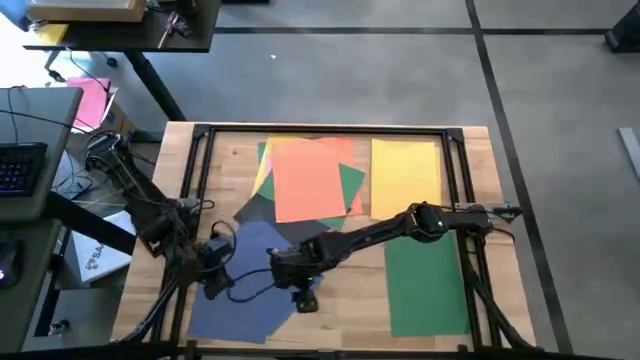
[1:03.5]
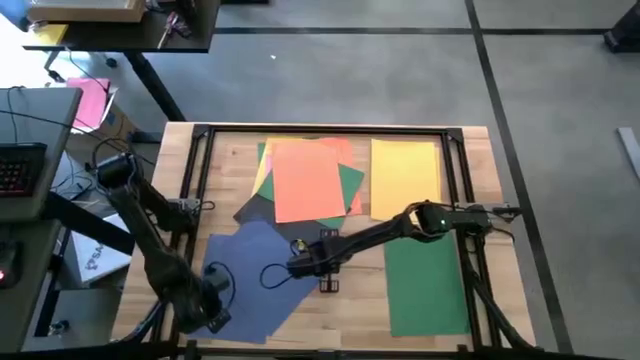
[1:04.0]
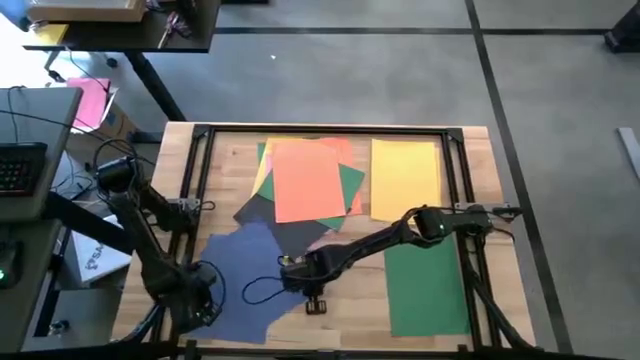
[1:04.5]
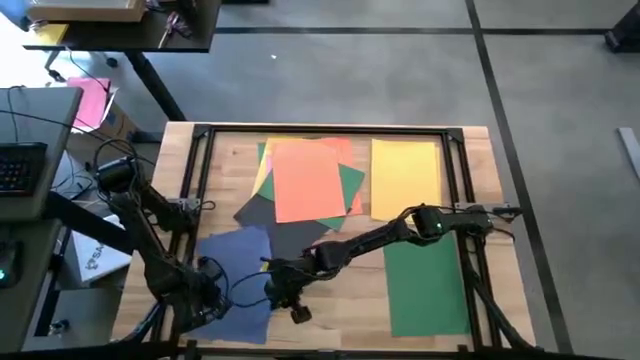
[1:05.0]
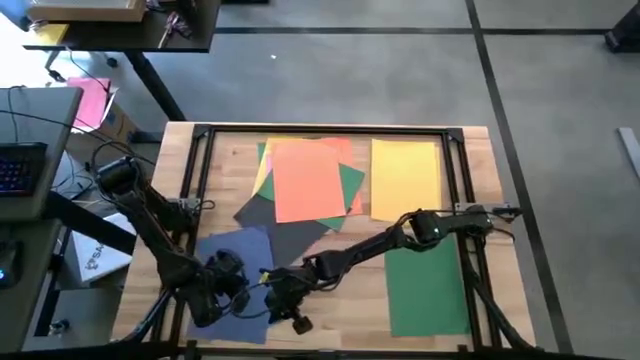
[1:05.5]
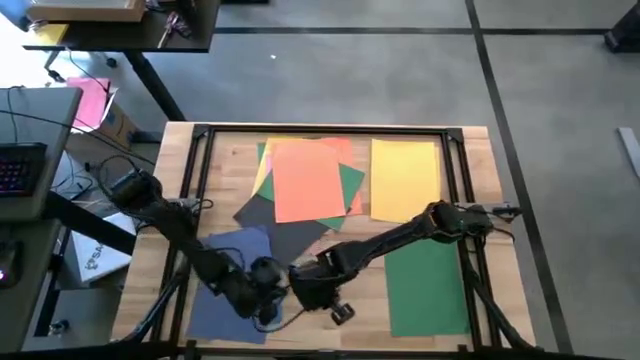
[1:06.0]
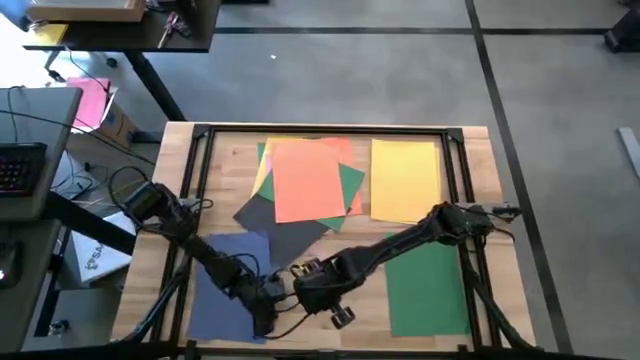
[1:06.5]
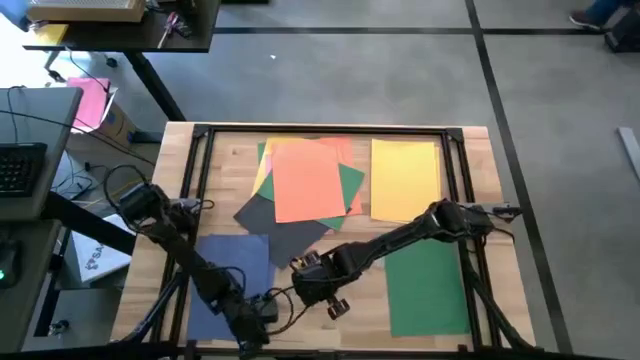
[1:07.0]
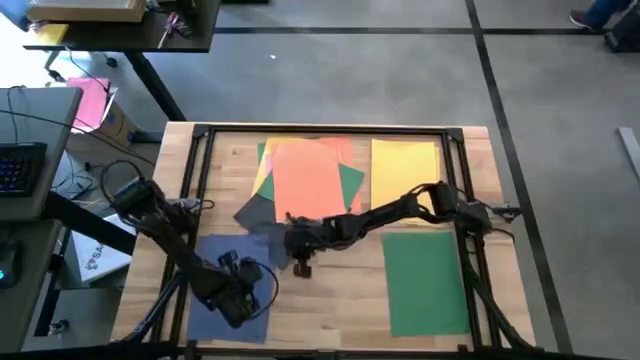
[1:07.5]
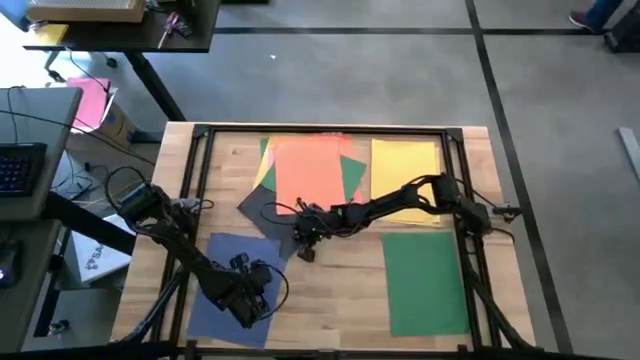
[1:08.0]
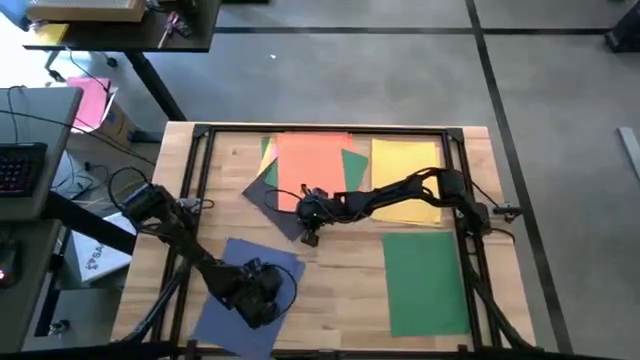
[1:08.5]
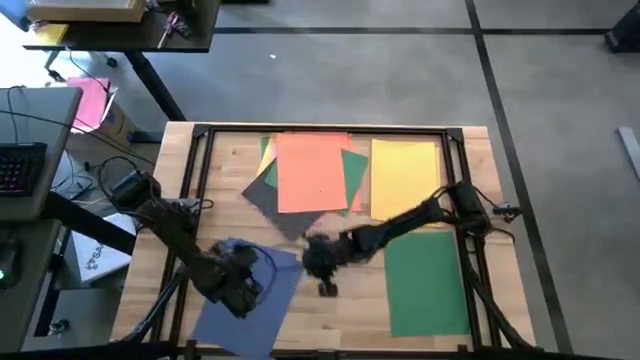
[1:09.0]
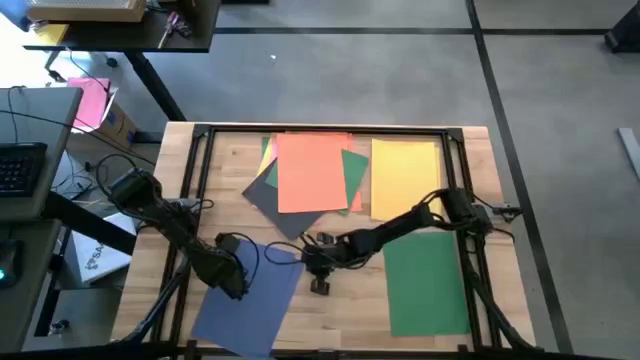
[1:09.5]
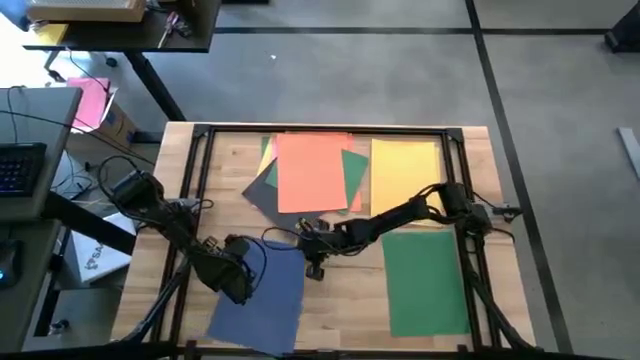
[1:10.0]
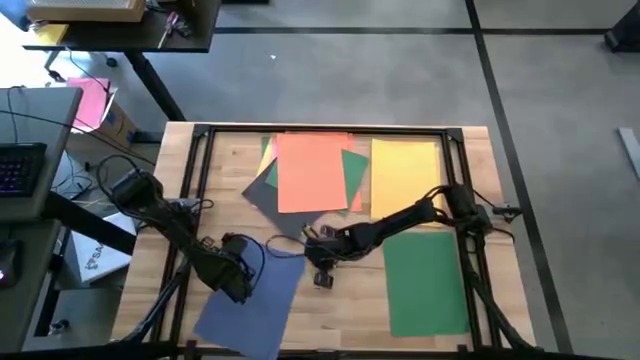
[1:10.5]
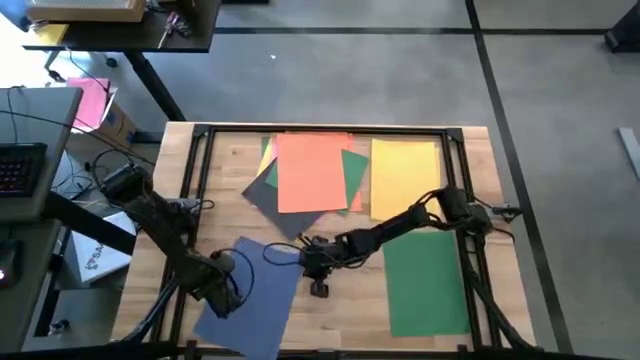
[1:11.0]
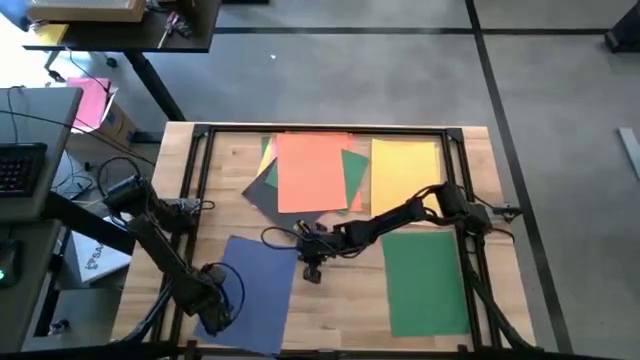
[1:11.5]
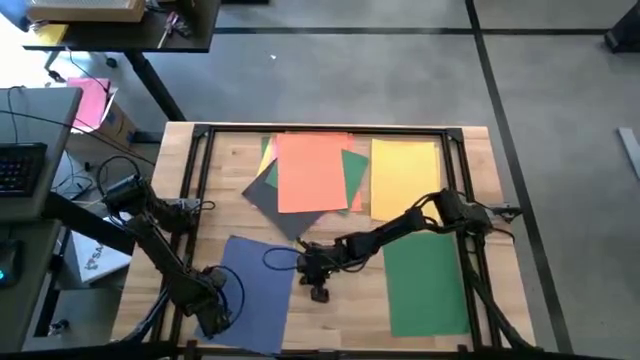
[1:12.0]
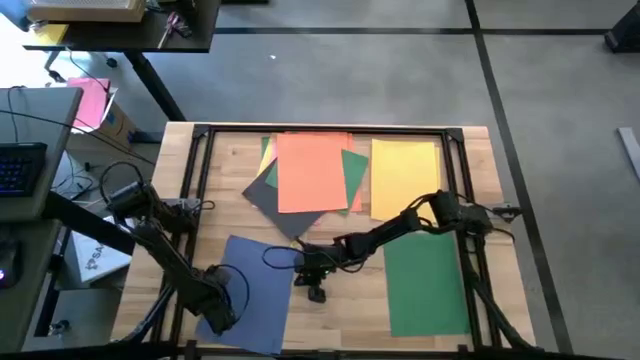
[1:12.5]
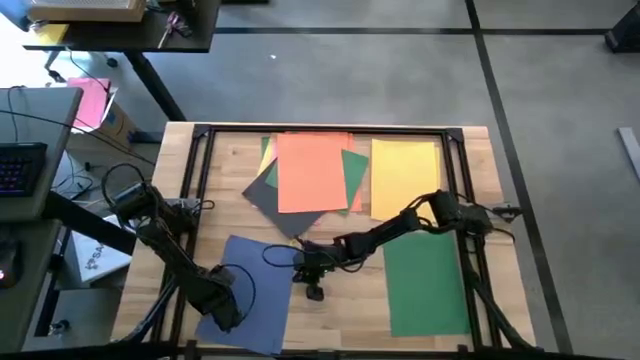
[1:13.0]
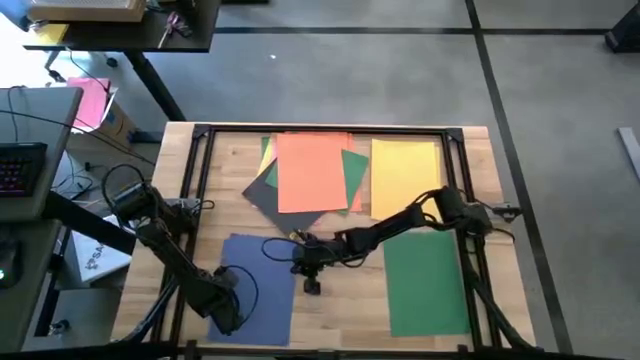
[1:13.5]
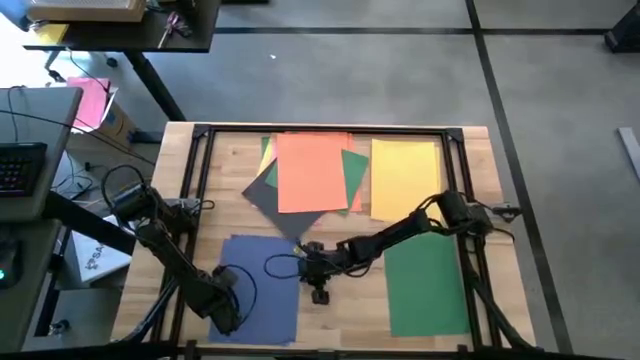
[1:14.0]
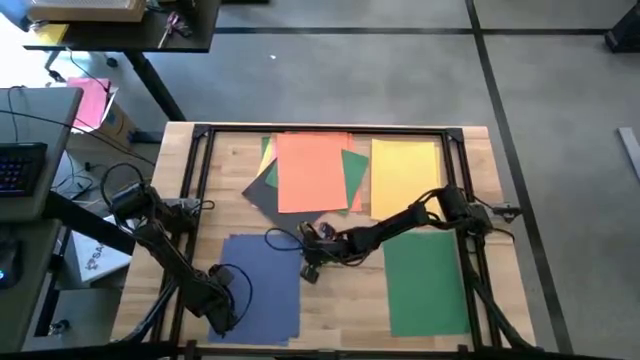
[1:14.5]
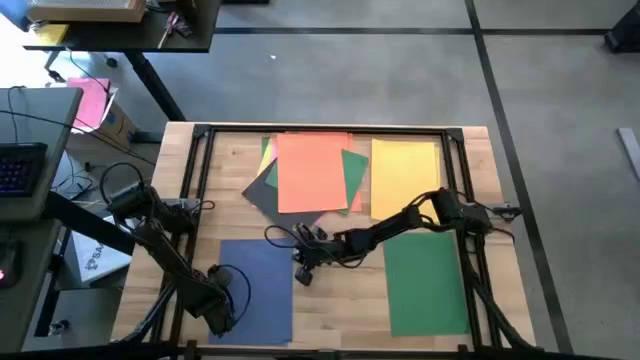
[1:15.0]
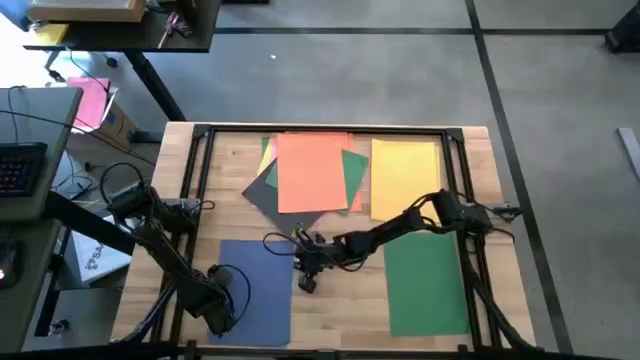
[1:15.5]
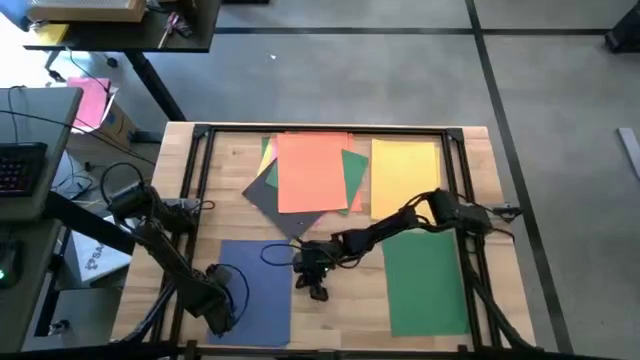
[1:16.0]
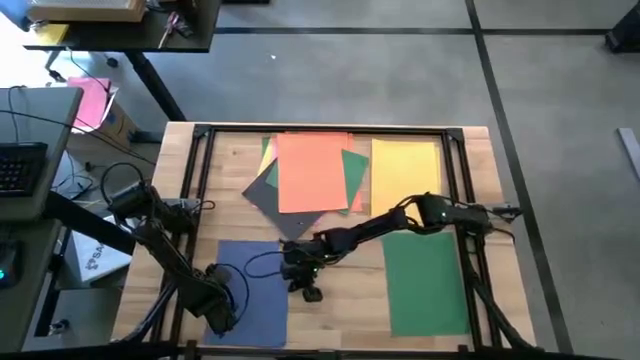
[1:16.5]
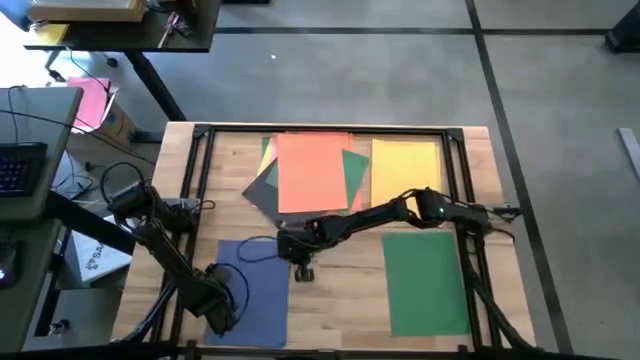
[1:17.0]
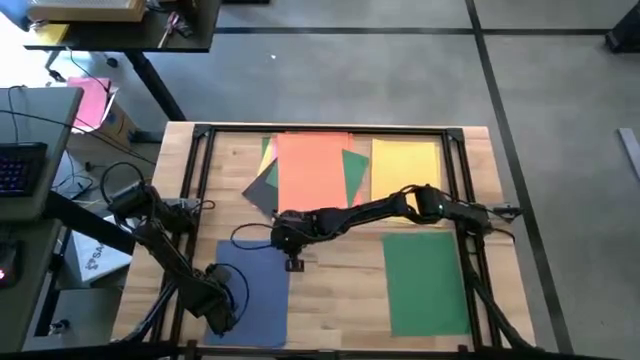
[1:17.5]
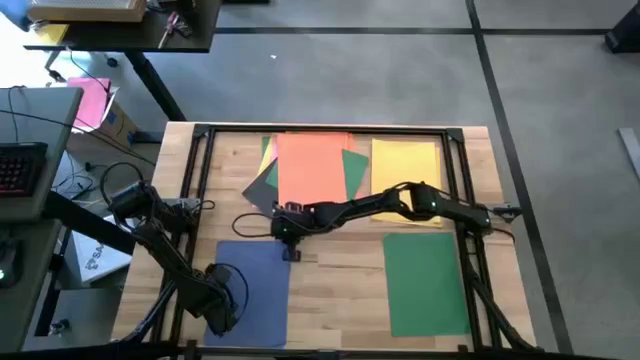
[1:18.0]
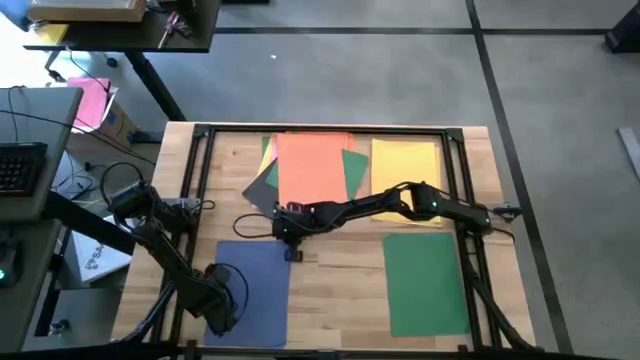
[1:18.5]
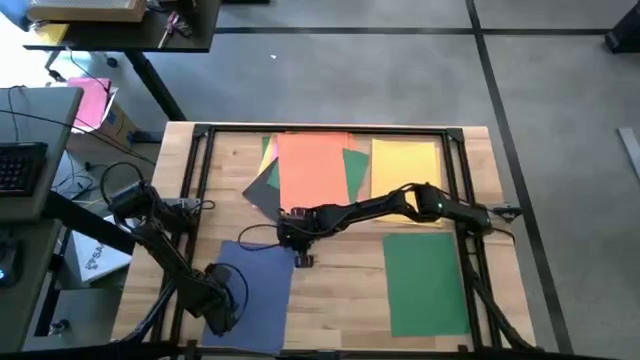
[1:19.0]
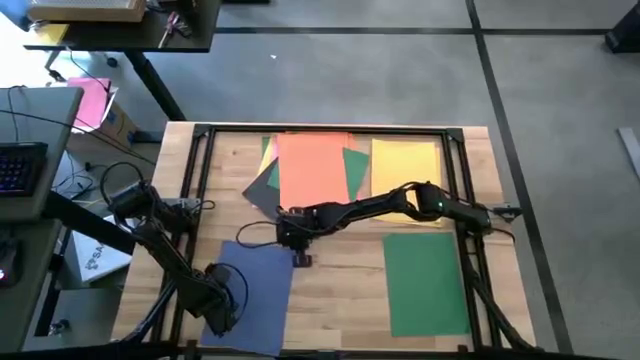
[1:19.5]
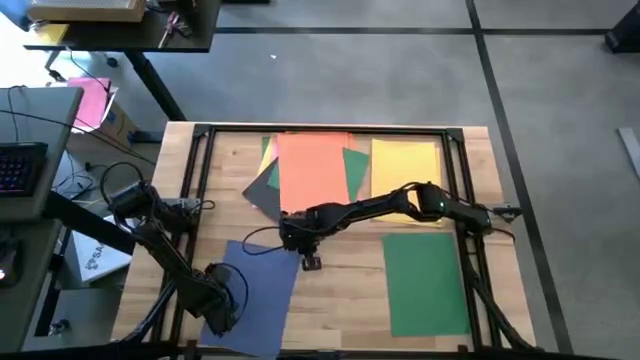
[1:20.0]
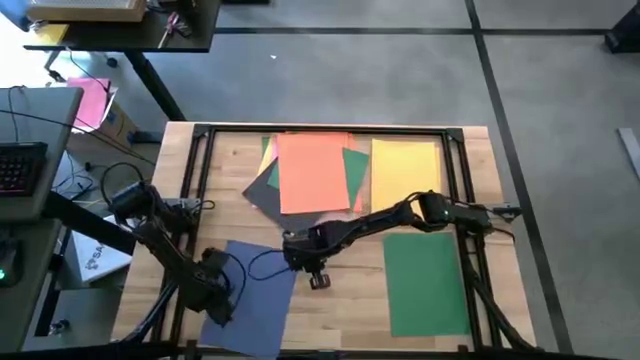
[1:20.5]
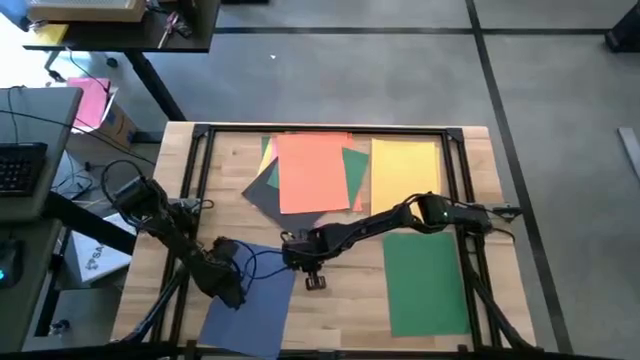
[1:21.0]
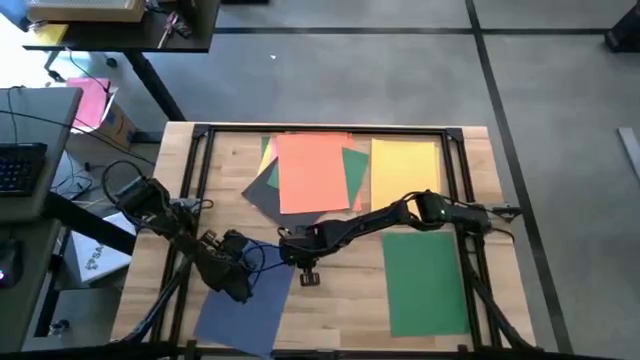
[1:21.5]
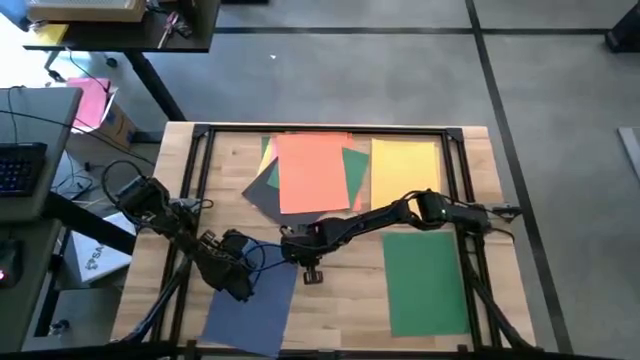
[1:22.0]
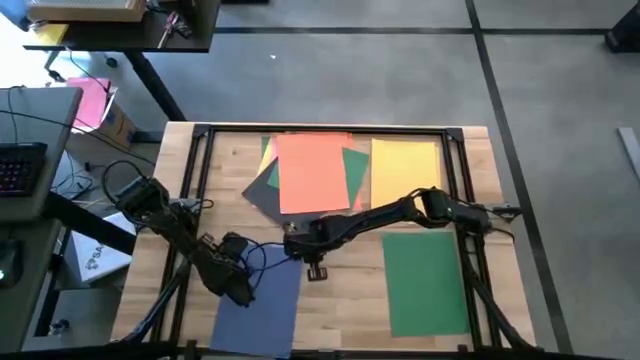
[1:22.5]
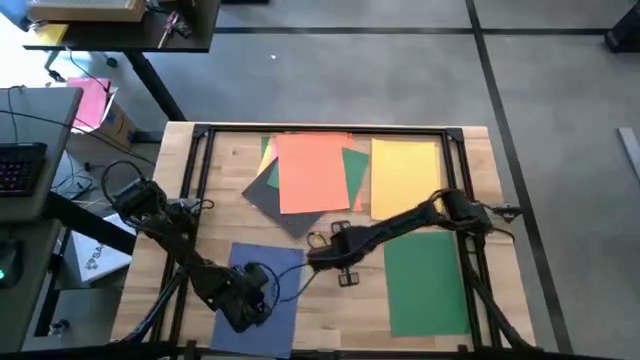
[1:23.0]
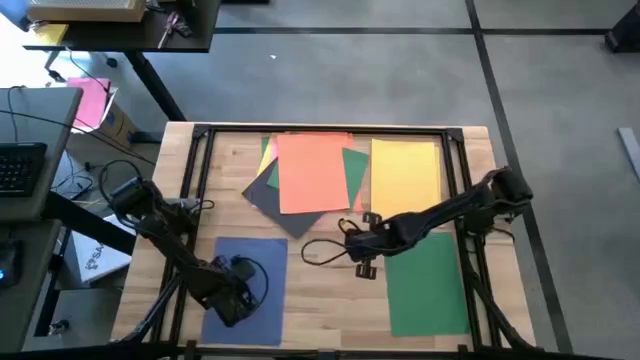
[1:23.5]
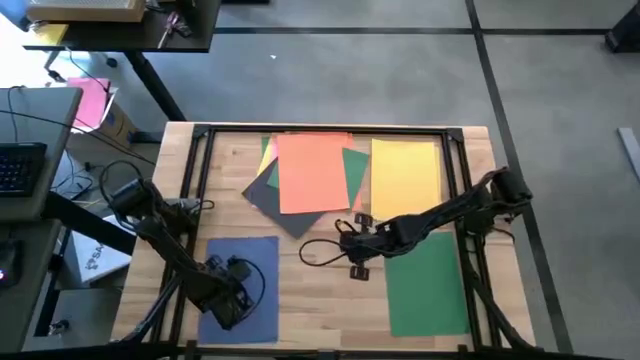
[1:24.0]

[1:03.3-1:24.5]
Task: Organize paper
Adjust the bottom left violet paper
